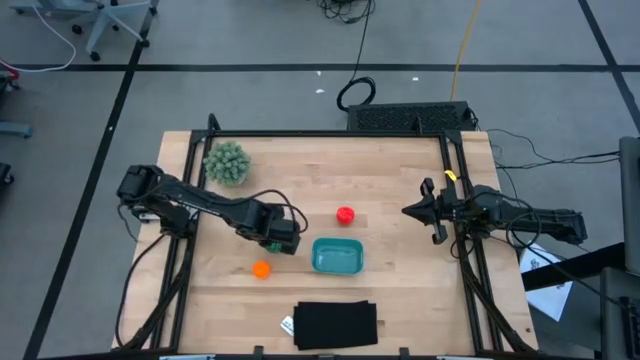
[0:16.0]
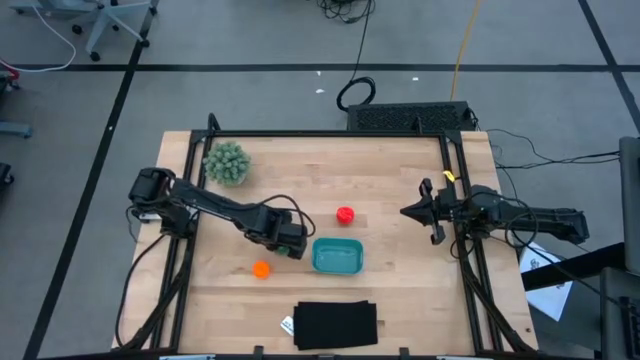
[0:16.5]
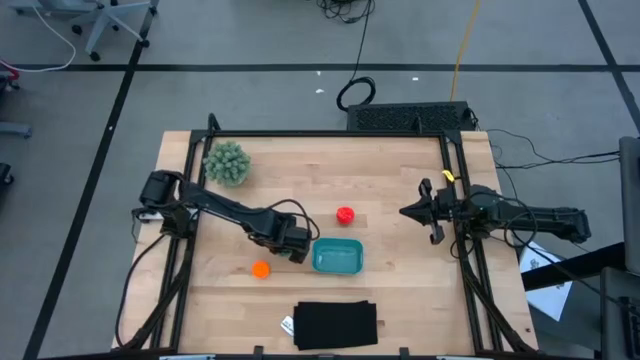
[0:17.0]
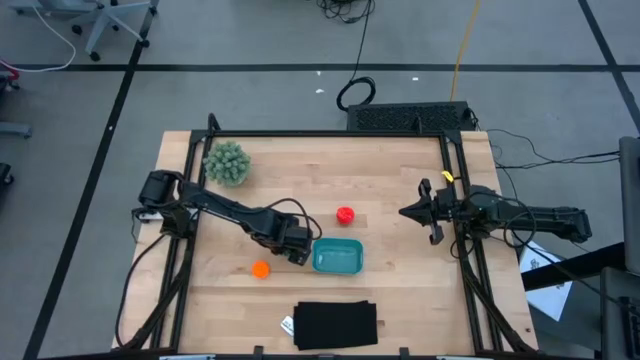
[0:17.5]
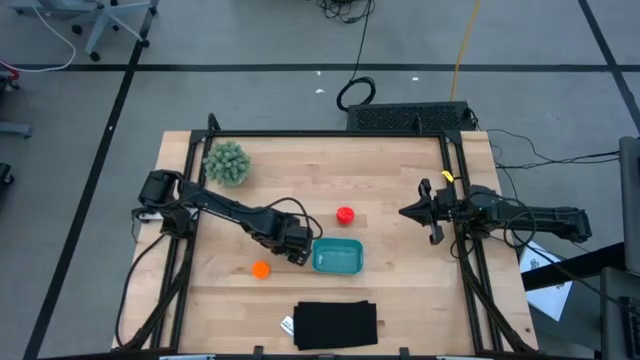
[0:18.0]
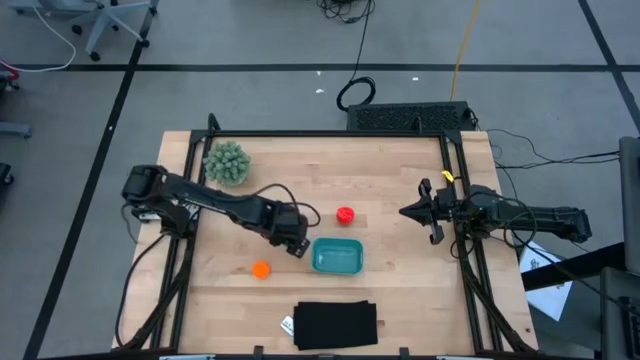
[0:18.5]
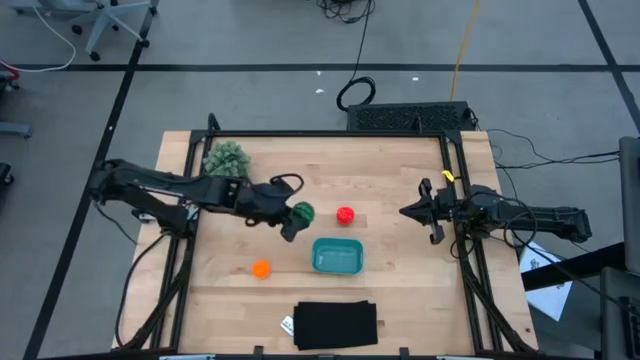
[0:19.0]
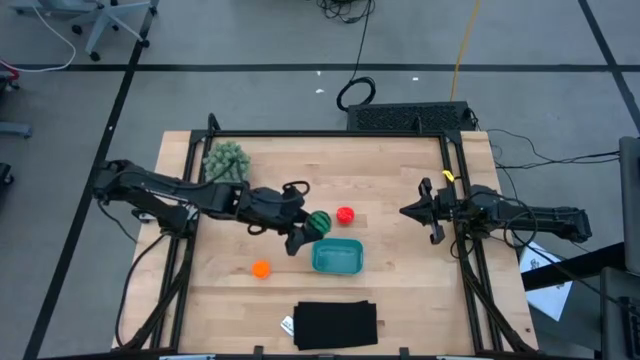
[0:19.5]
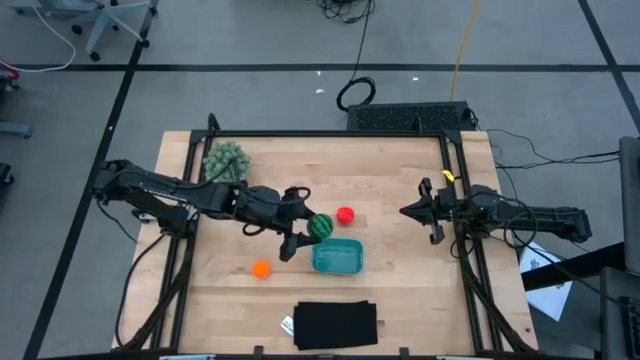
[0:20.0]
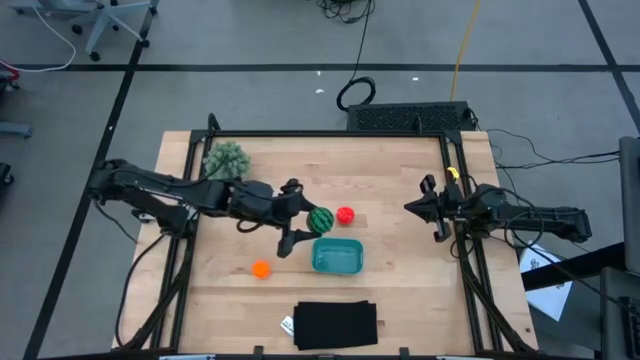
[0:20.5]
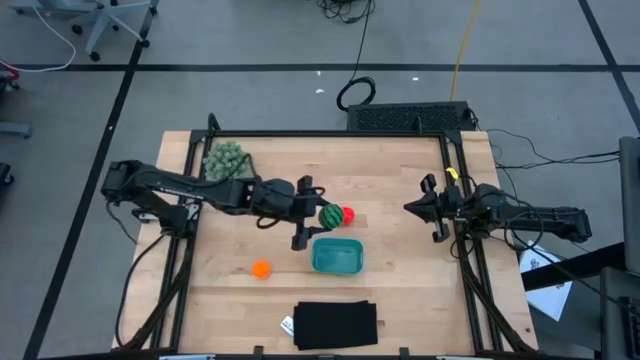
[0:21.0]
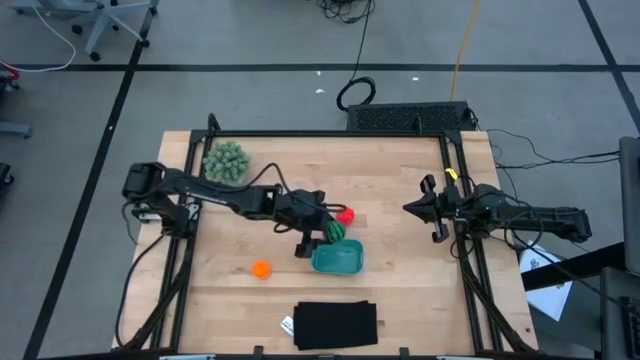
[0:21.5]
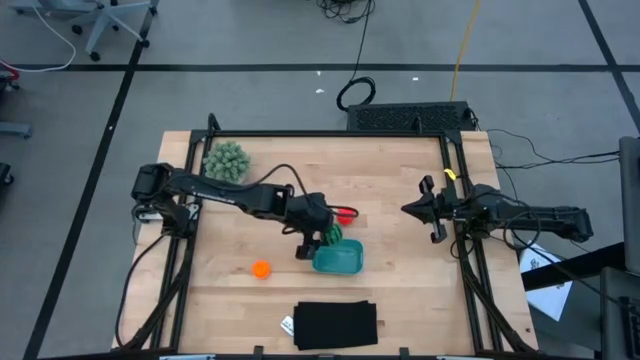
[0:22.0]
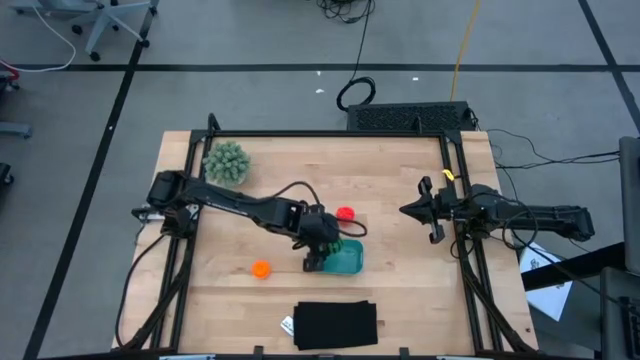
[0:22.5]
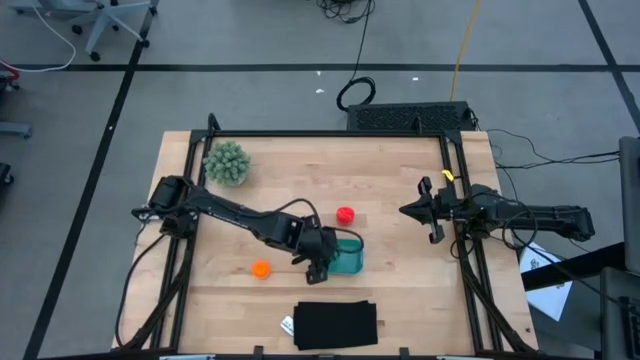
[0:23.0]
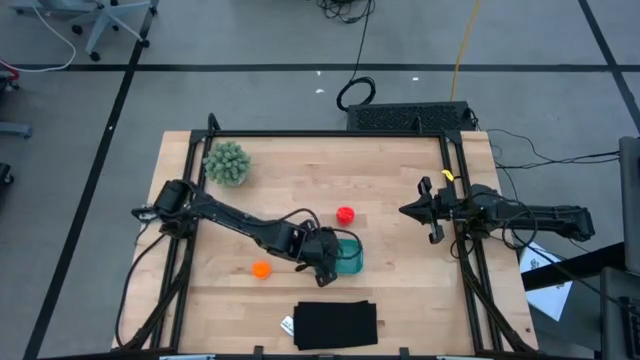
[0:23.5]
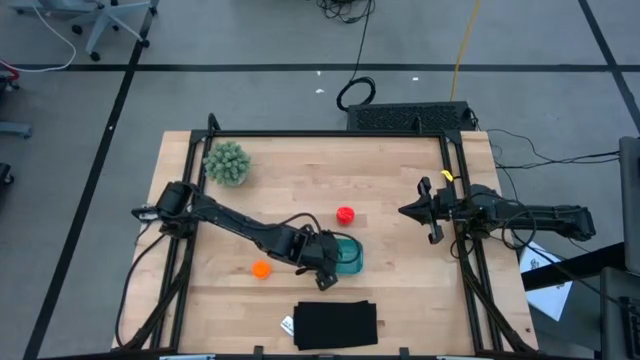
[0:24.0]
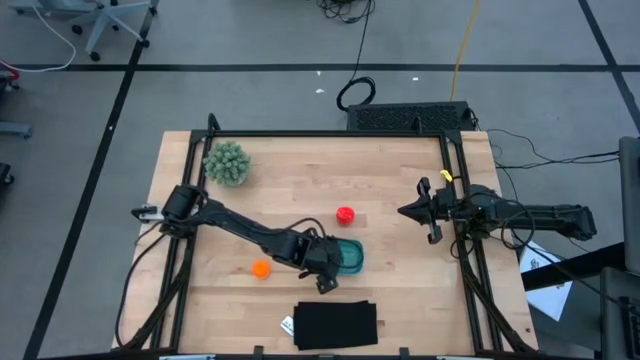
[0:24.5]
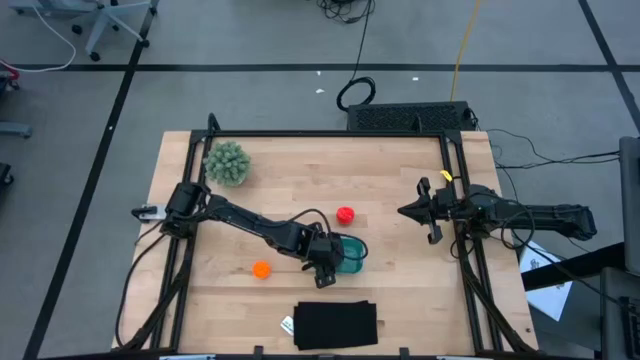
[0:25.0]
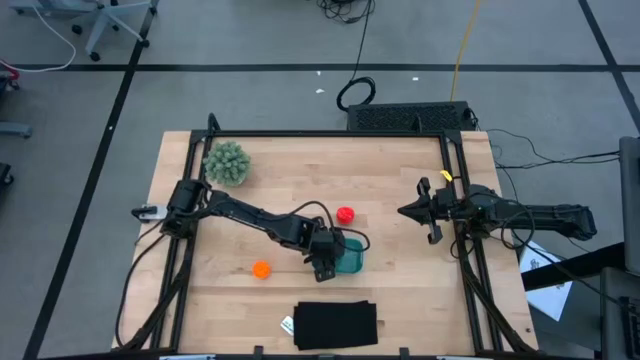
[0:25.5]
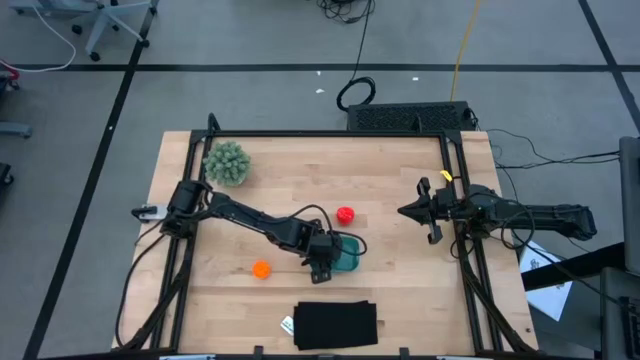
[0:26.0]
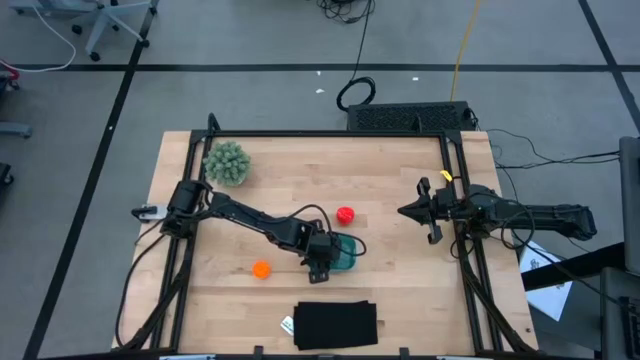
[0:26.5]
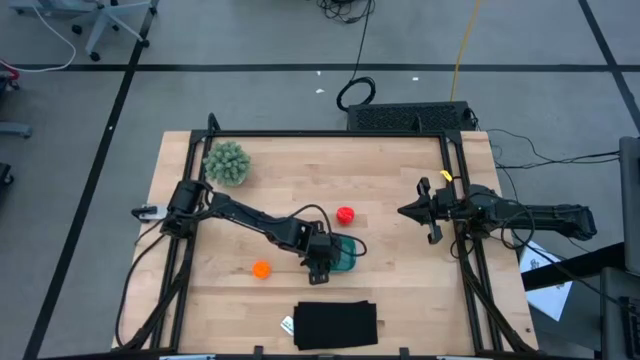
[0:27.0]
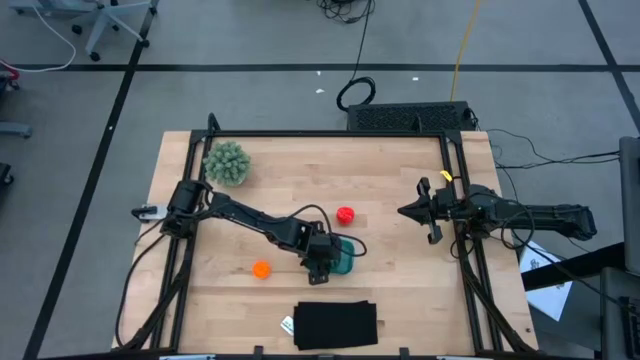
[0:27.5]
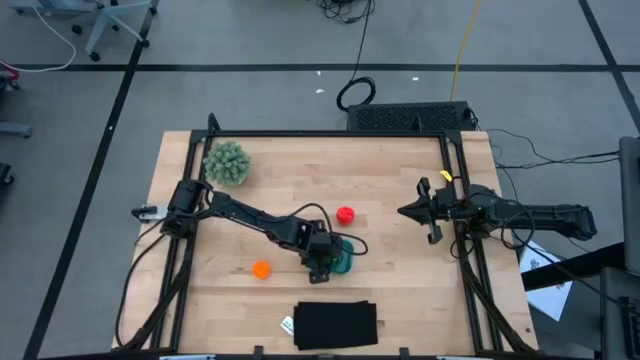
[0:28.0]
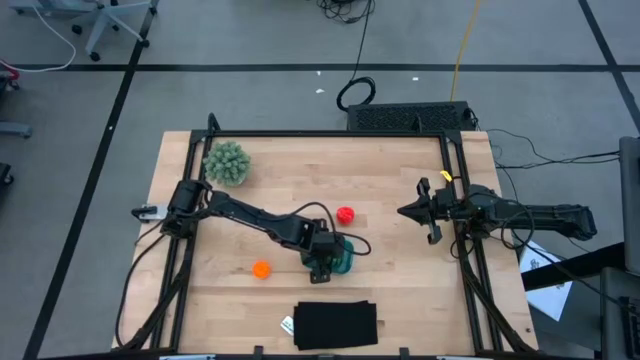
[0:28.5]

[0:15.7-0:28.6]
Task: Pick and placing Produce into tupperware
Put the watermelon into the bin

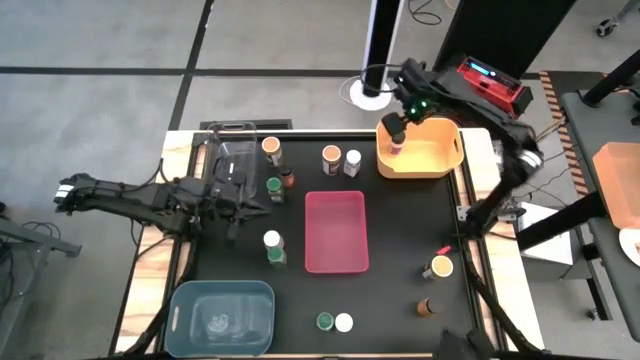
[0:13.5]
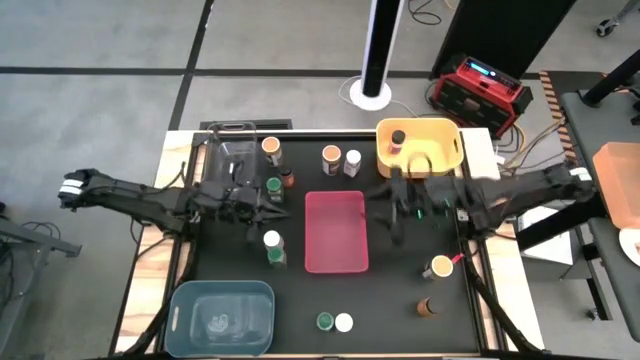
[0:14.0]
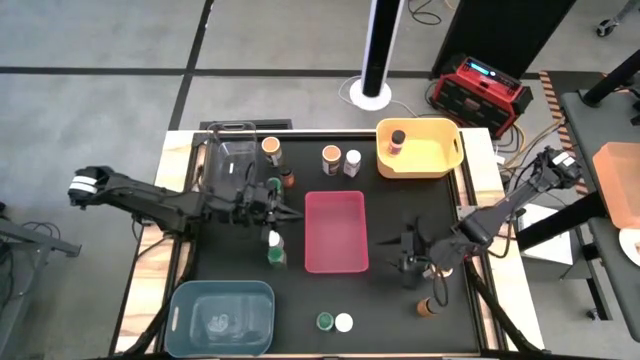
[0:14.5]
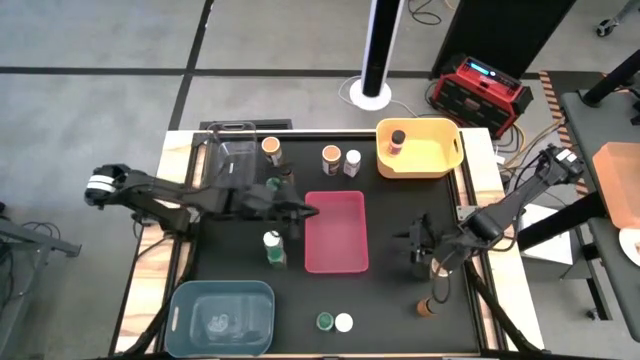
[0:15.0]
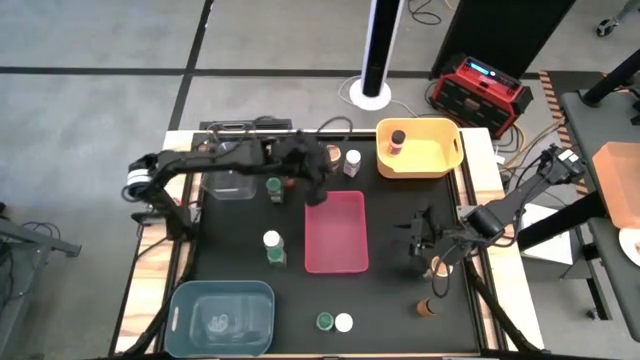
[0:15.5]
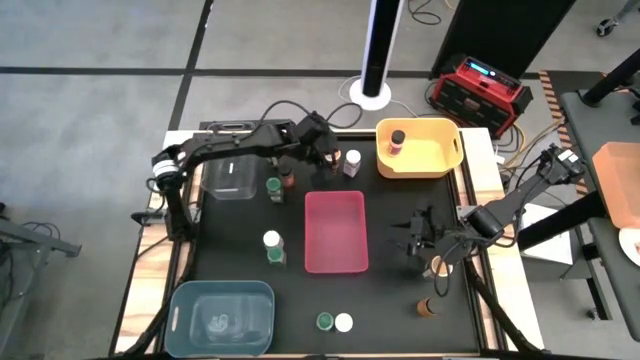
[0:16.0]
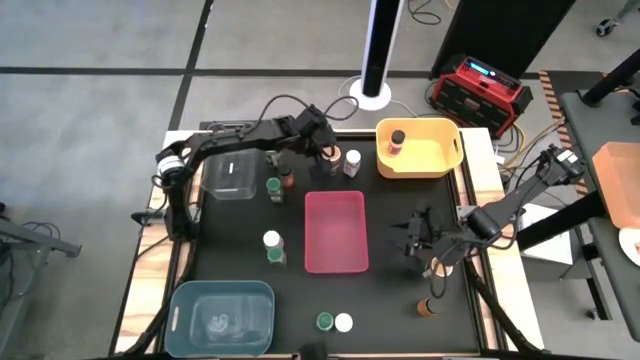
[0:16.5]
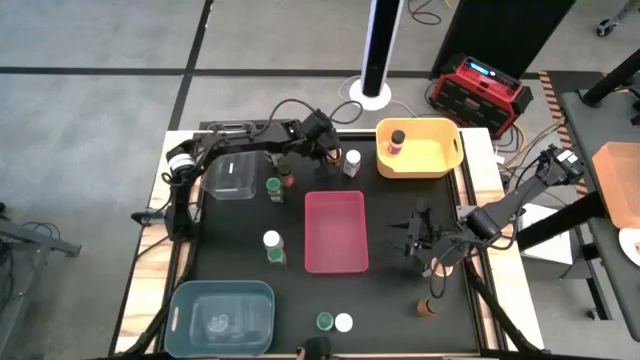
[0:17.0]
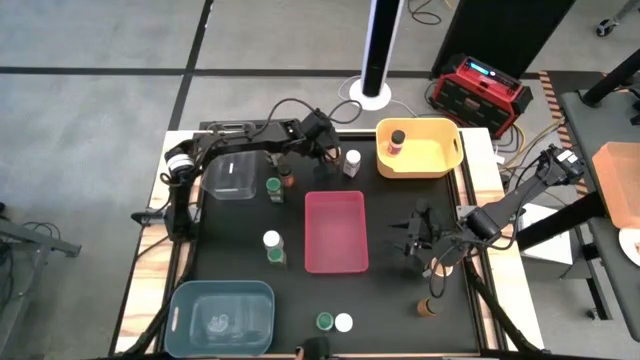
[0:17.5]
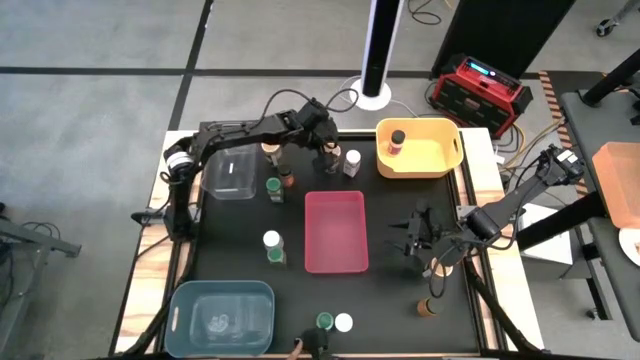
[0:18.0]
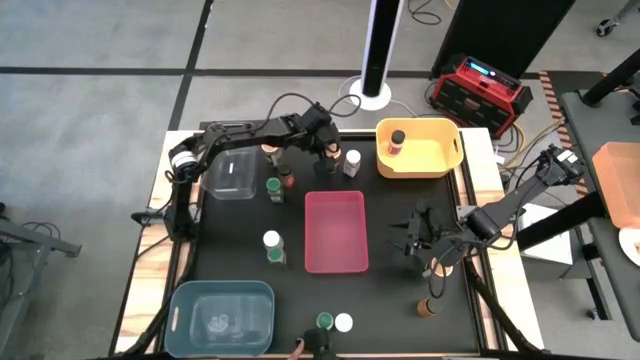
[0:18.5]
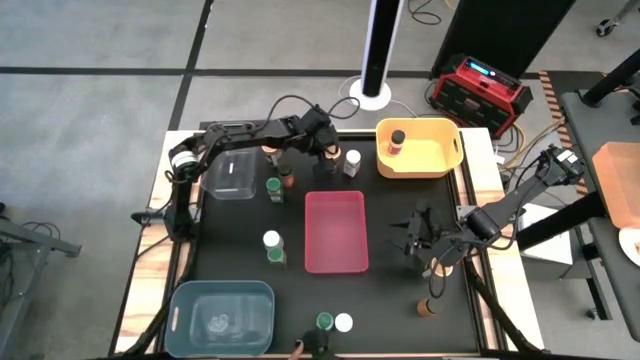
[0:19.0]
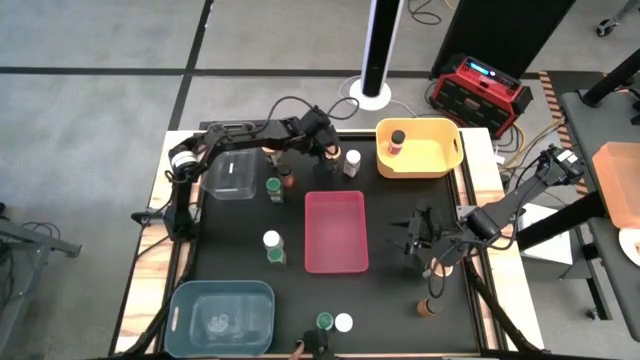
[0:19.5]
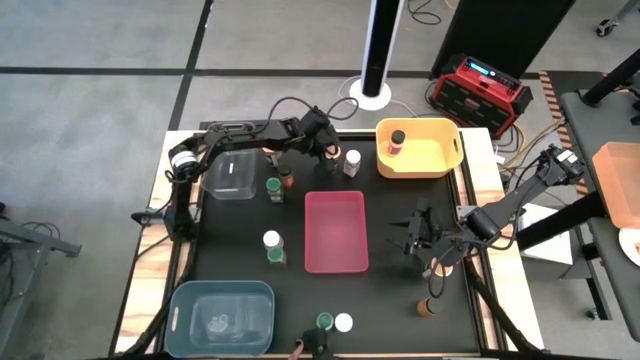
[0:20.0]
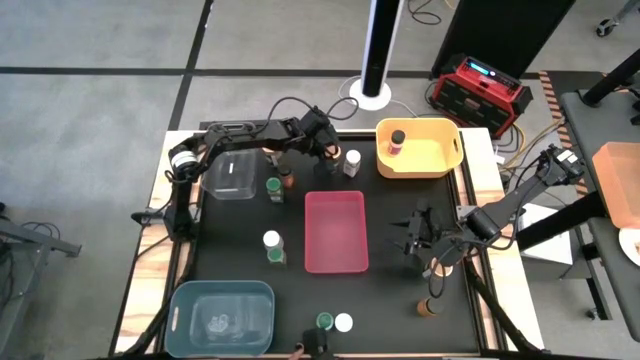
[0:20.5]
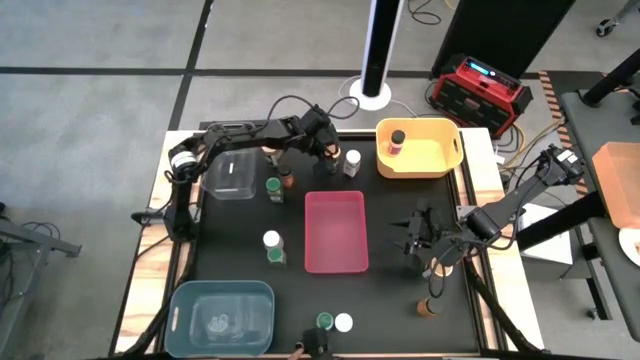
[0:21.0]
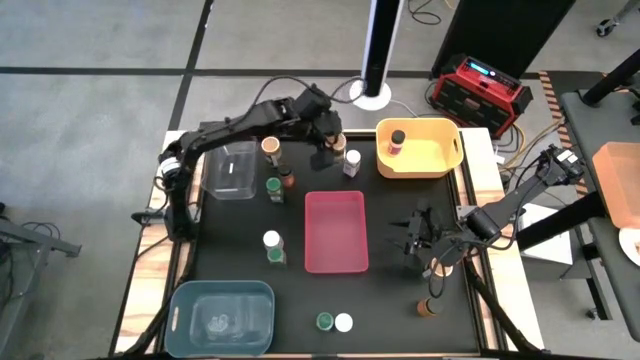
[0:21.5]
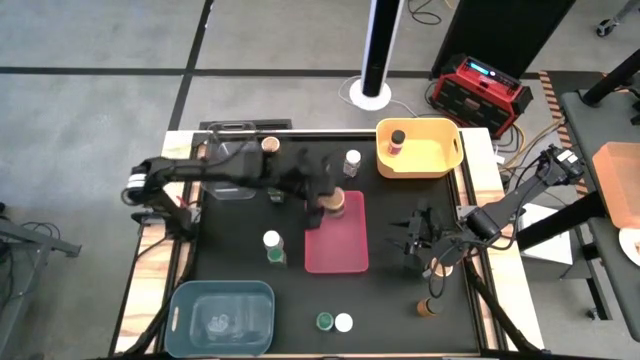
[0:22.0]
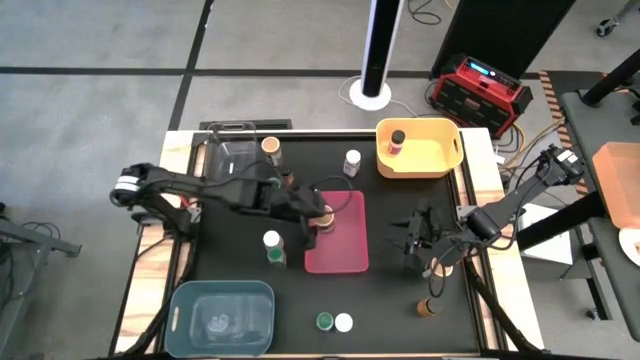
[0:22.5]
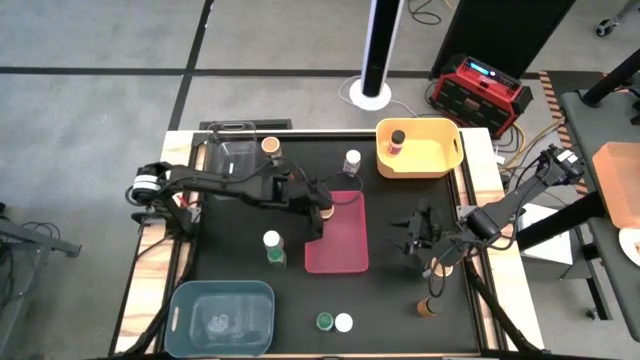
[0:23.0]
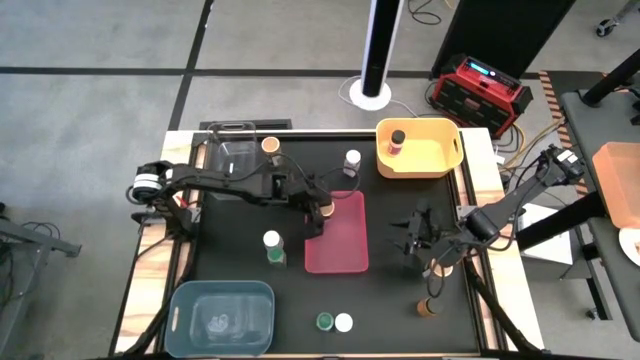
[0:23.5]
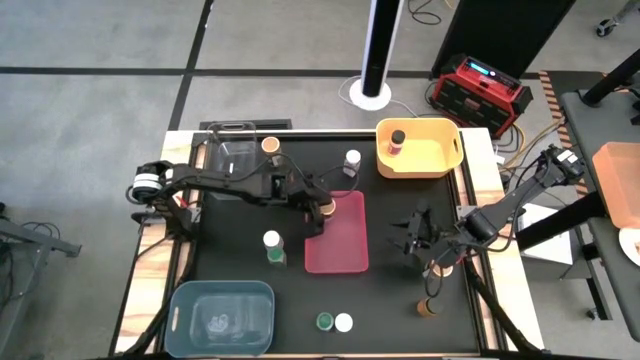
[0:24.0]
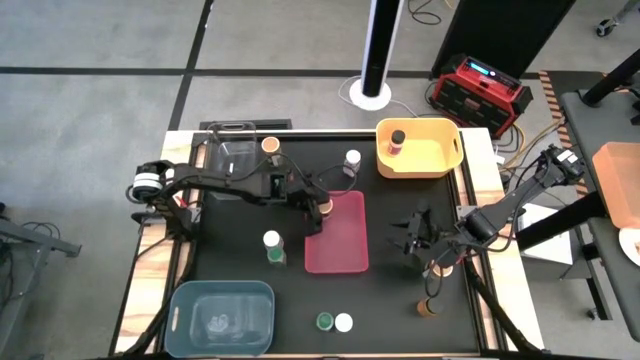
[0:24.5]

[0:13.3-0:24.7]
Task: Sort spices by type
Put the top right gold seasoning bottle into the red bin
